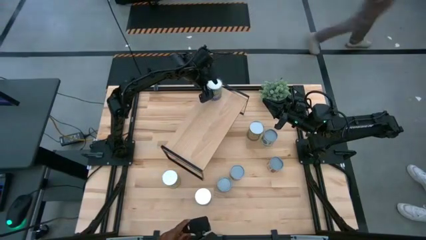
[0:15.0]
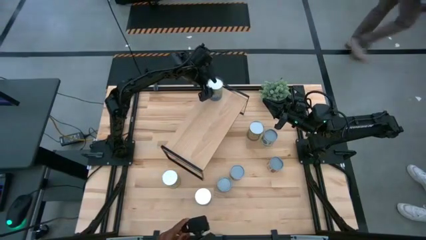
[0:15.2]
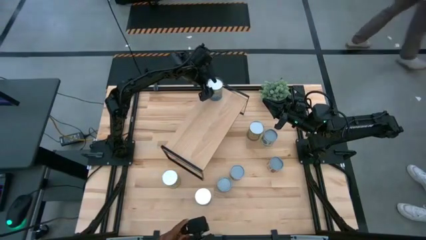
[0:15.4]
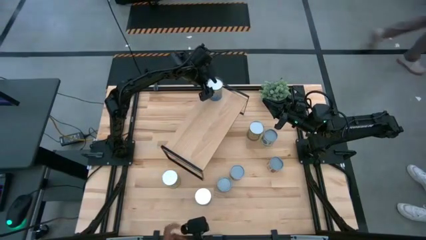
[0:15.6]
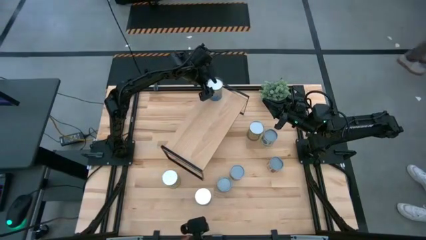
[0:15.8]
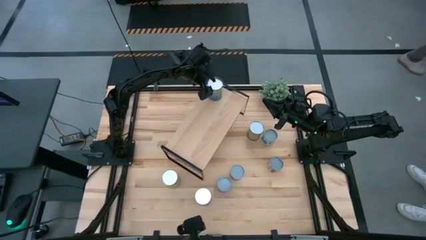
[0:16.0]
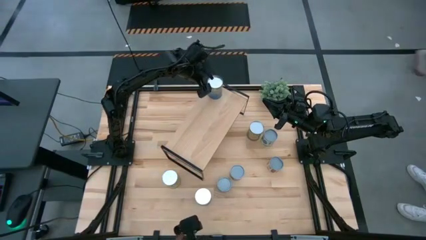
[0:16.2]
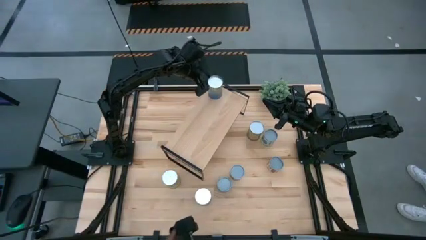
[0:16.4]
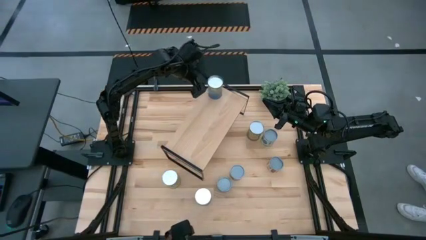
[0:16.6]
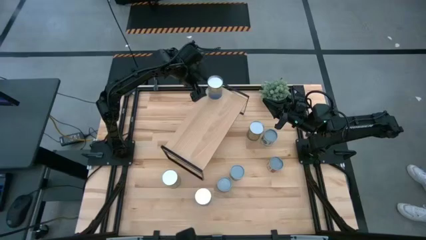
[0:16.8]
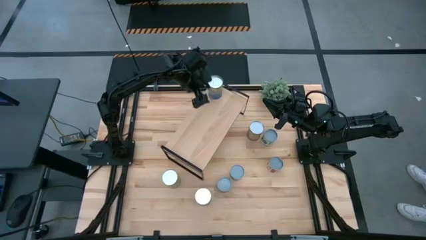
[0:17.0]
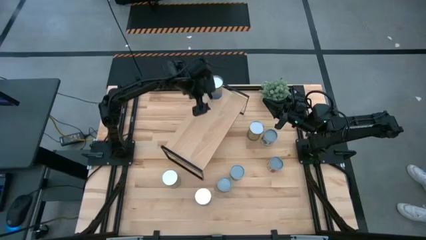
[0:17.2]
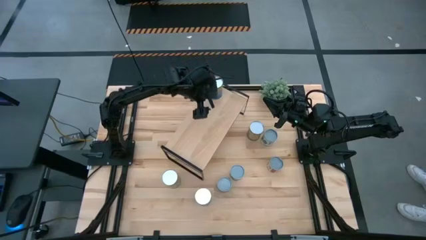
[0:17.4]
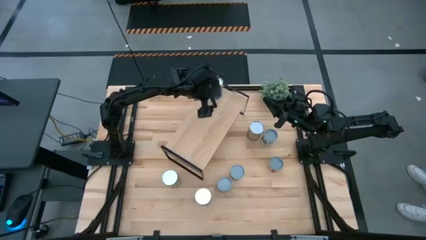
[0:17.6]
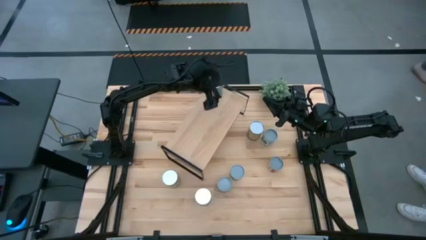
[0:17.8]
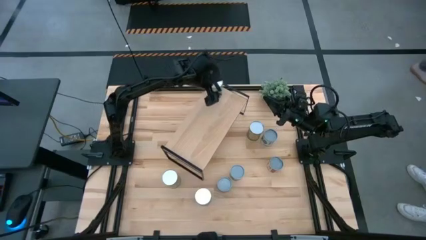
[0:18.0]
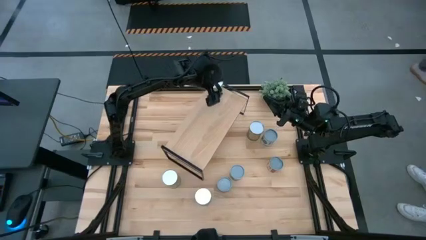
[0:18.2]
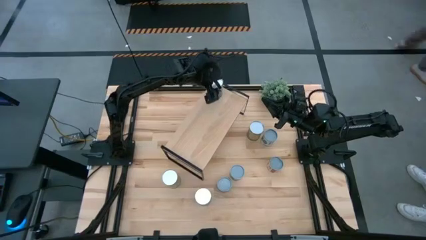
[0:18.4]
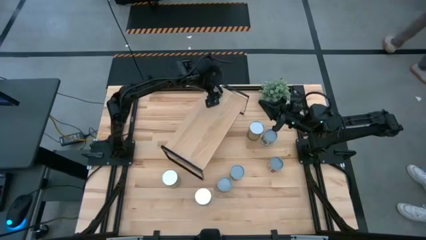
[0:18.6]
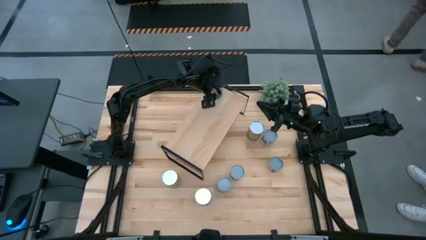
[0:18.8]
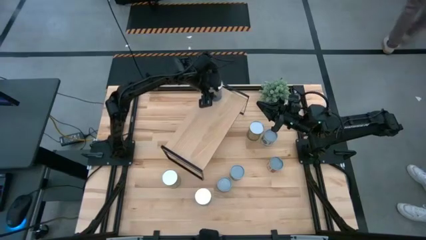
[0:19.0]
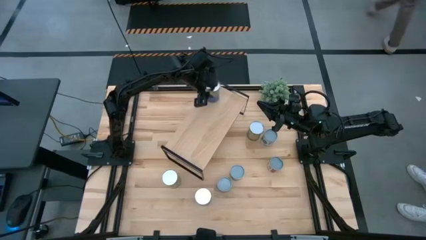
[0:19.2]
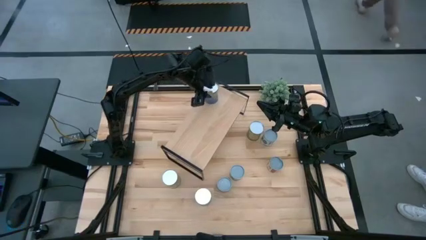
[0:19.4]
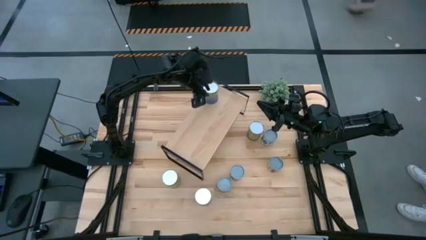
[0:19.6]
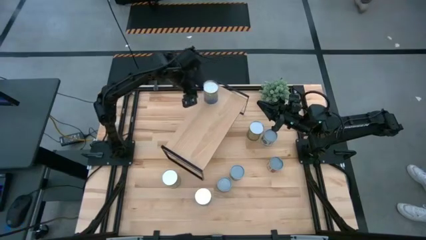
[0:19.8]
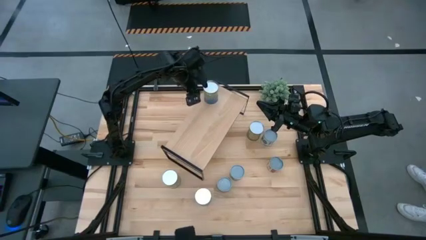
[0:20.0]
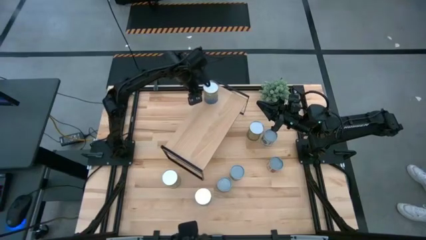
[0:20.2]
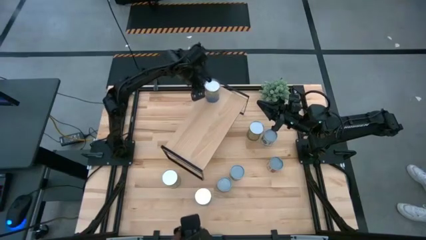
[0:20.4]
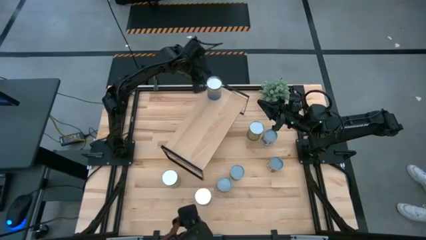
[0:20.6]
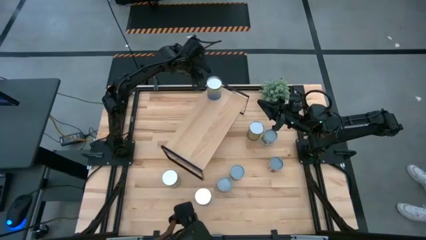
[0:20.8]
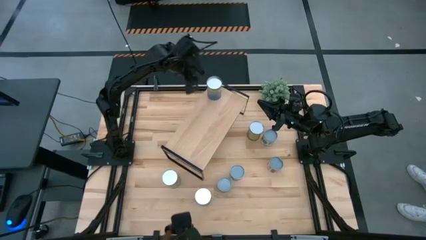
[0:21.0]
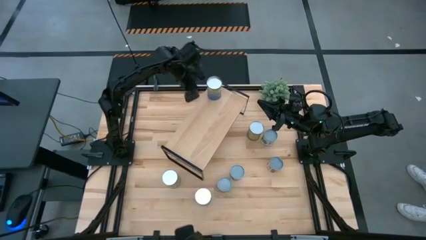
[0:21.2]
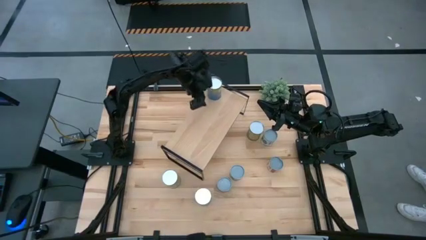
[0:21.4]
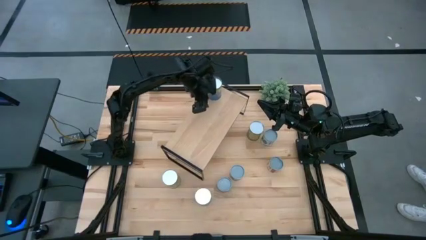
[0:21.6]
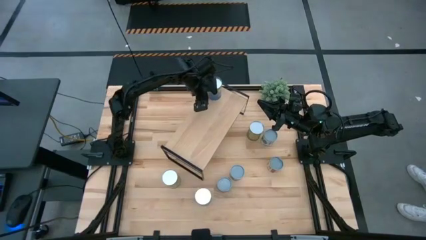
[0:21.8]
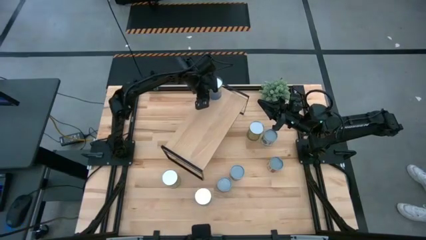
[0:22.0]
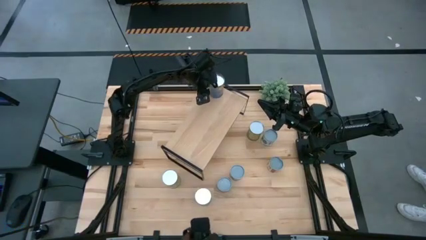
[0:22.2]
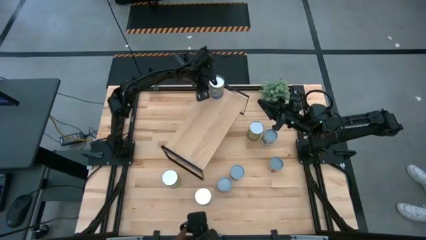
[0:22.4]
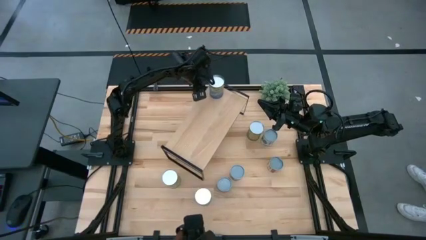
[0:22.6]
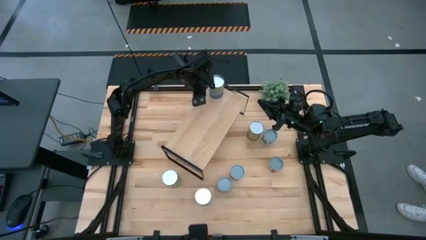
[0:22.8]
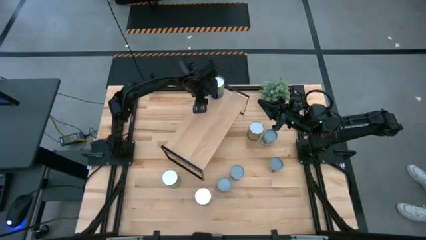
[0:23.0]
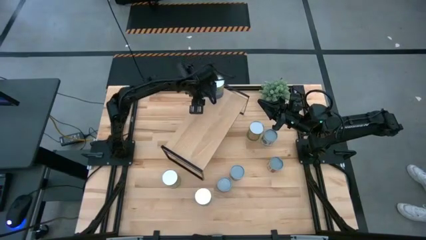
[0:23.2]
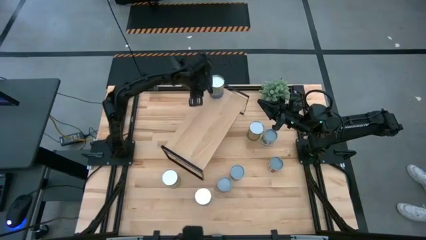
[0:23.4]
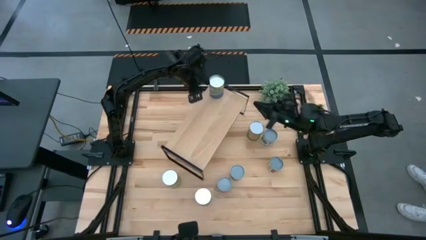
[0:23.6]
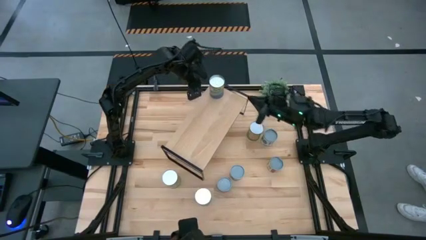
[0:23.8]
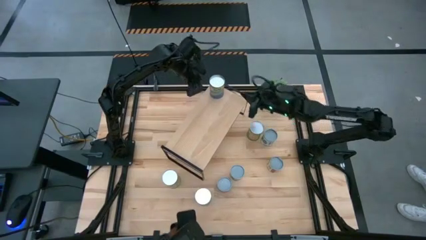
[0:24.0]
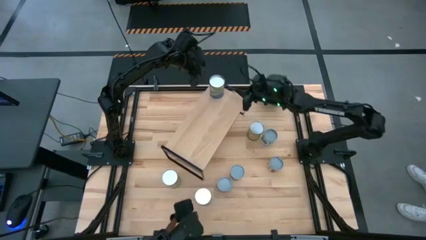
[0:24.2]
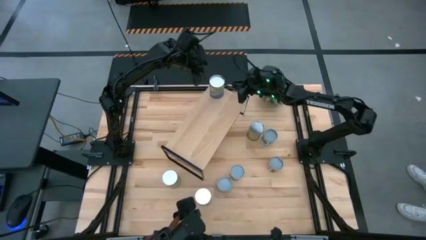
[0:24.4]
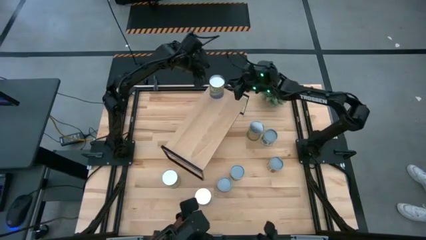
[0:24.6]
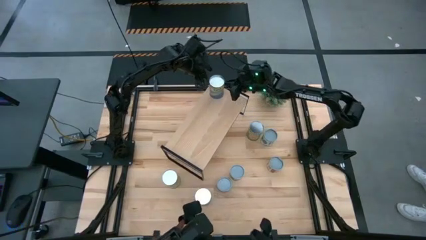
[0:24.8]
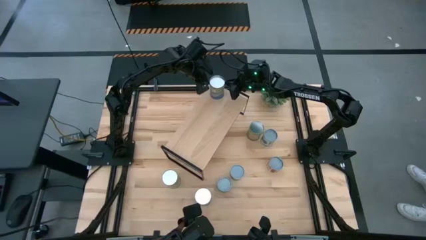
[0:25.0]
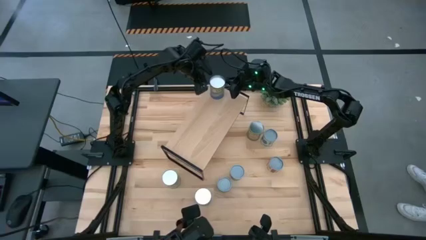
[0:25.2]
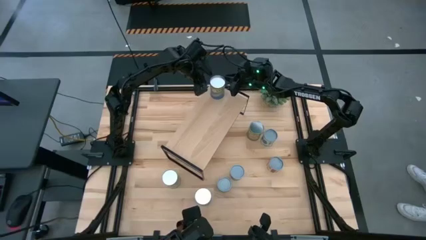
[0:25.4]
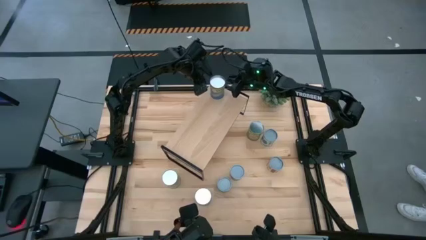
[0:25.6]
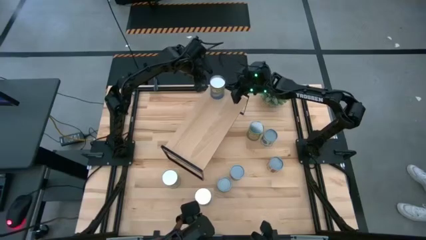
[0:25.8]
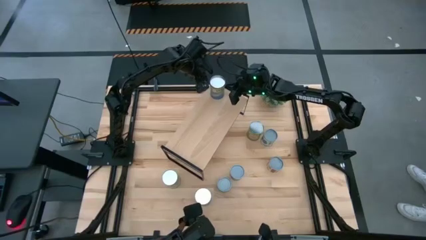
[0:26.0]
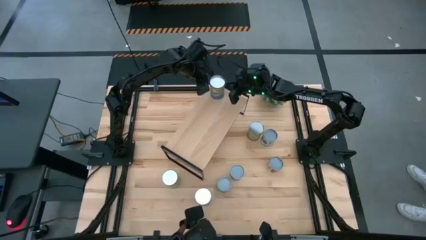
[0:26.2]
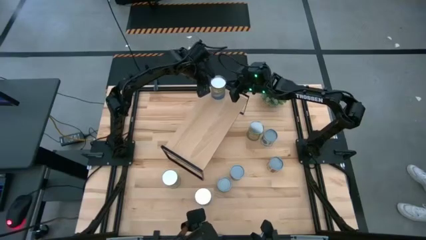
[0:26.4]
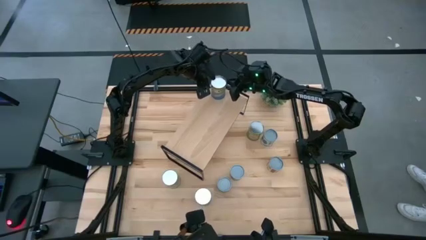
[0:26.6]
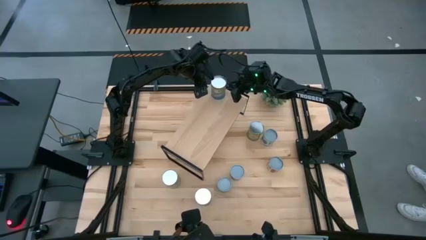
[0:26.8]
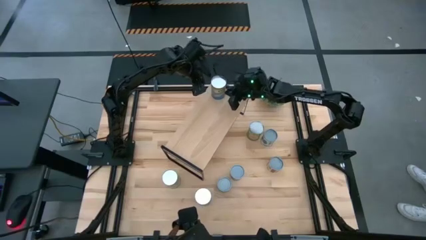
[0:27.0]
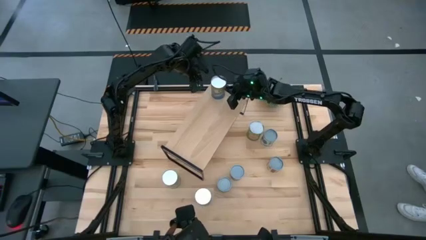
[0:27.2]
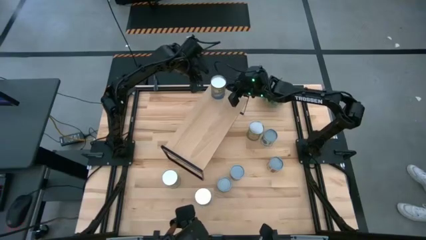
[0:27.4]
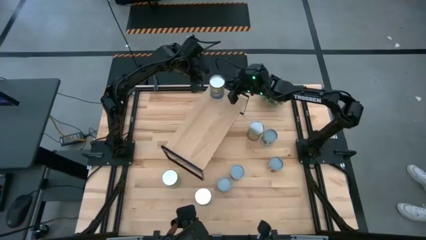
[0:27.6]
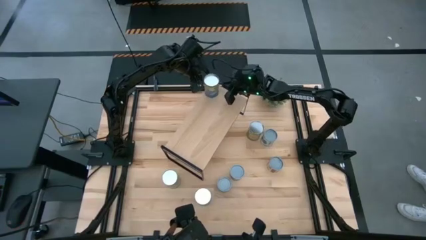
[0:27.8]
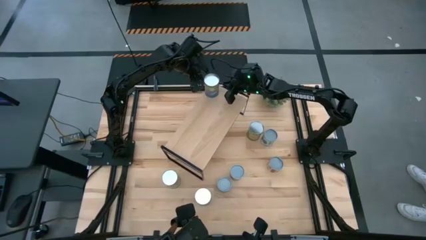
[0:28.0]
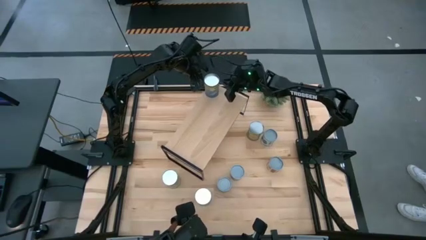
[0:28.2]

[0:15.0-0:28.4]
Task: Pick and place cans onto a shelf
Put the canned peas on the shelf
